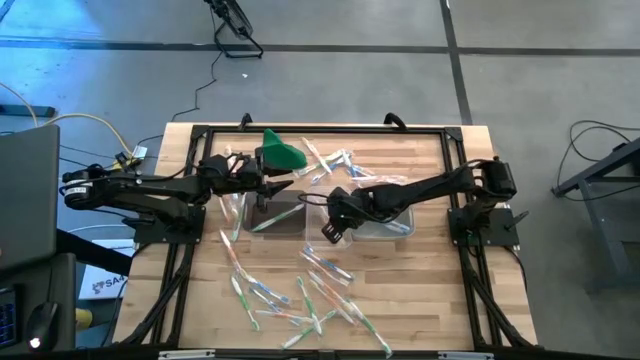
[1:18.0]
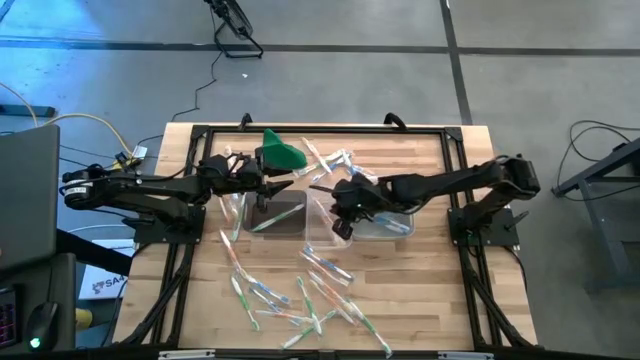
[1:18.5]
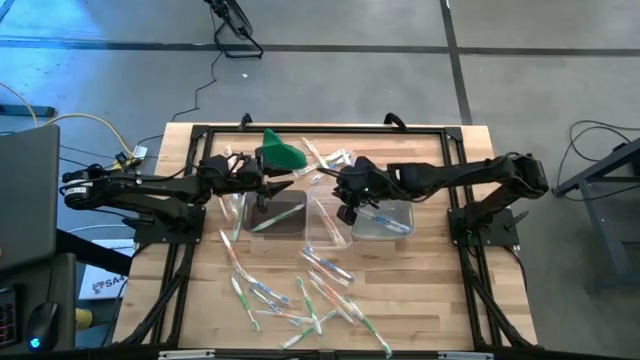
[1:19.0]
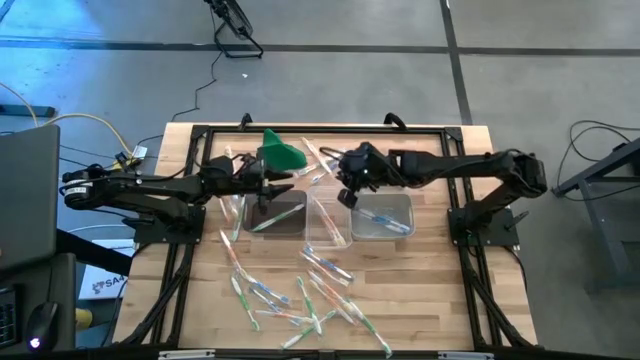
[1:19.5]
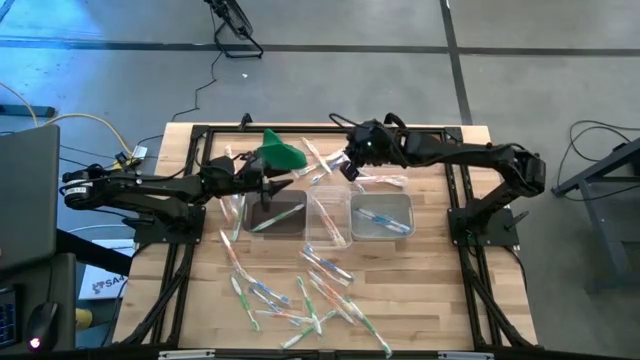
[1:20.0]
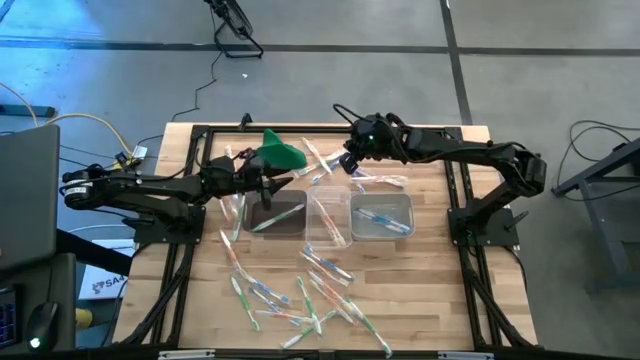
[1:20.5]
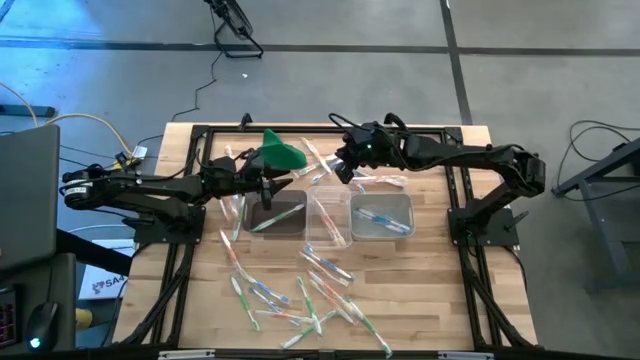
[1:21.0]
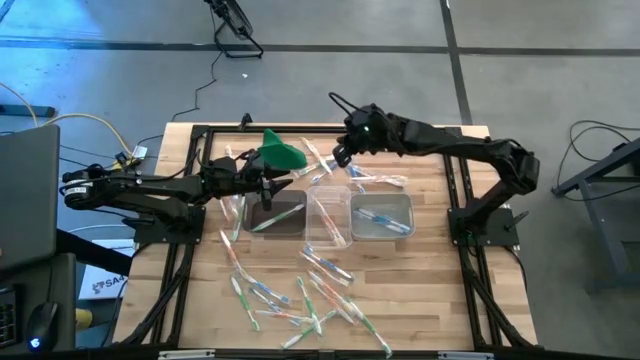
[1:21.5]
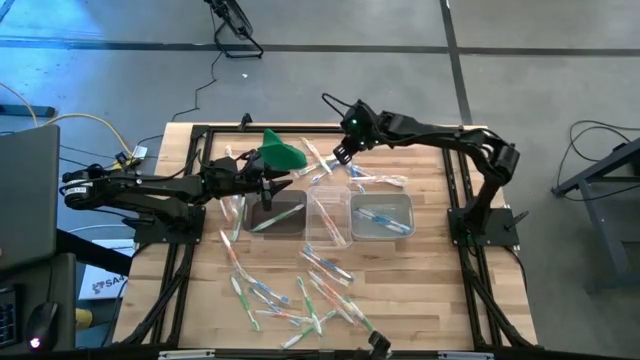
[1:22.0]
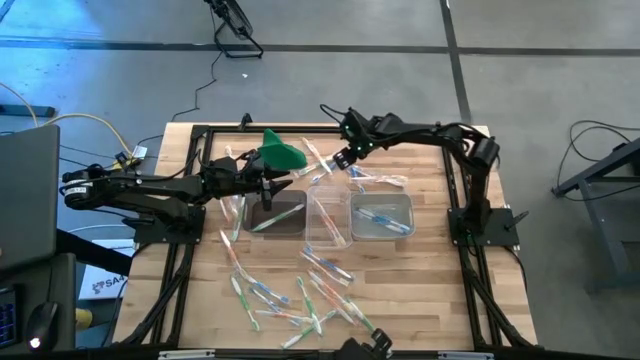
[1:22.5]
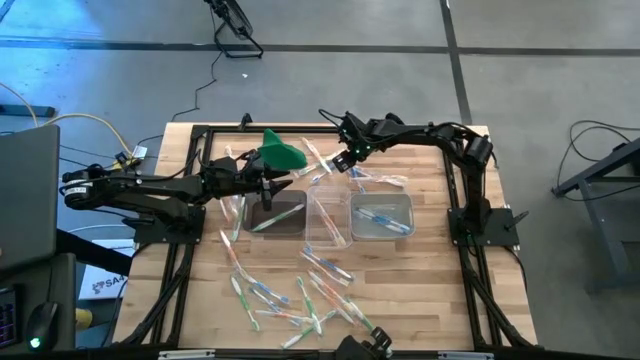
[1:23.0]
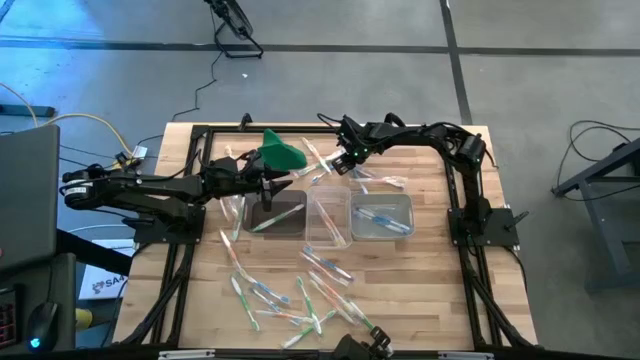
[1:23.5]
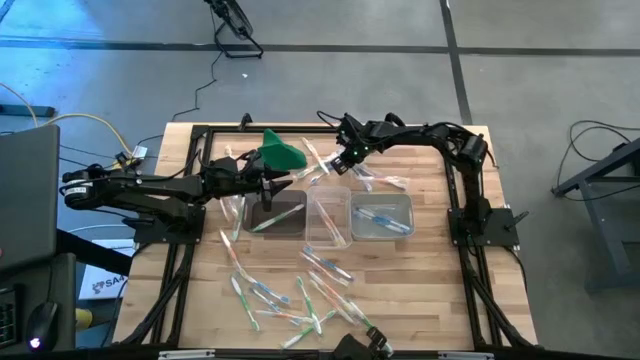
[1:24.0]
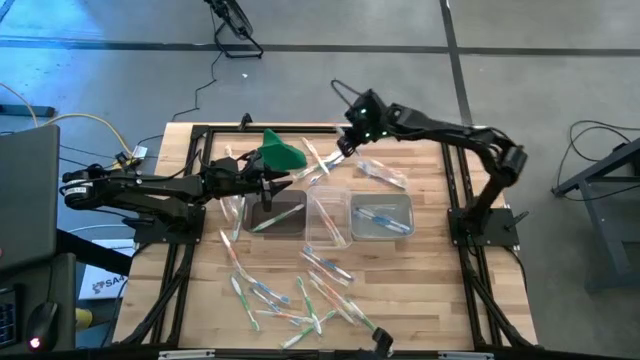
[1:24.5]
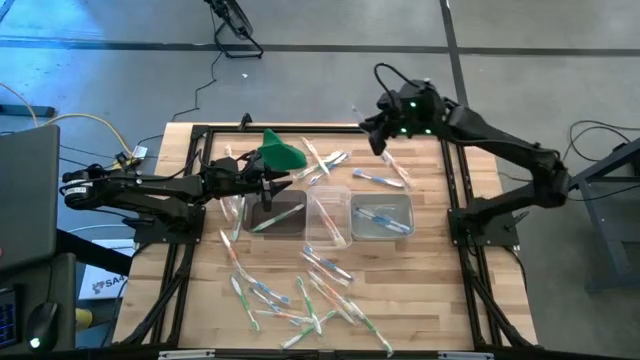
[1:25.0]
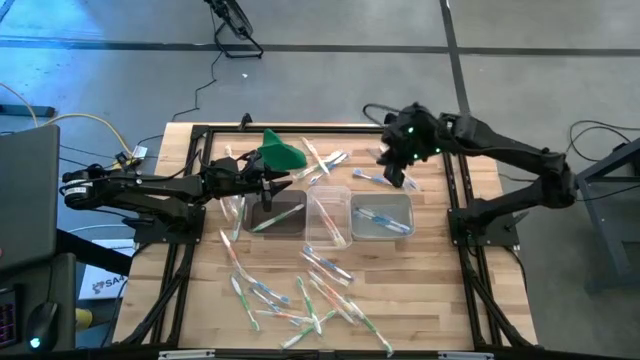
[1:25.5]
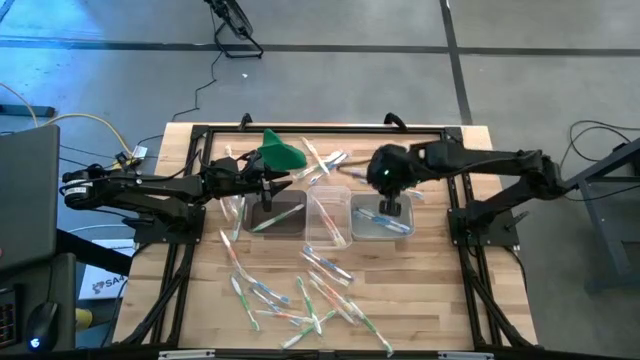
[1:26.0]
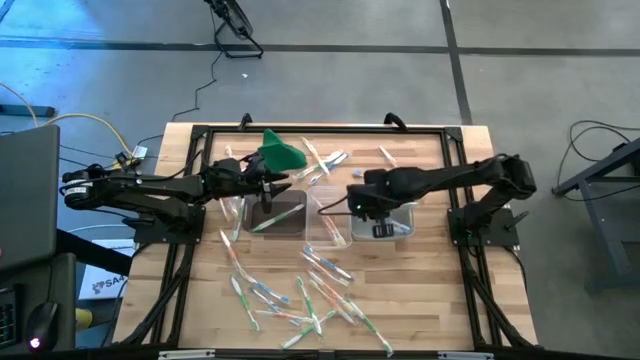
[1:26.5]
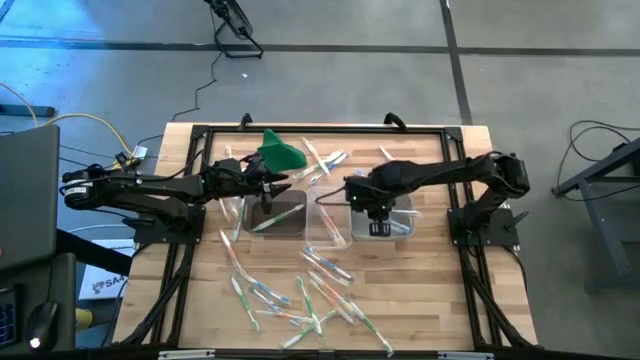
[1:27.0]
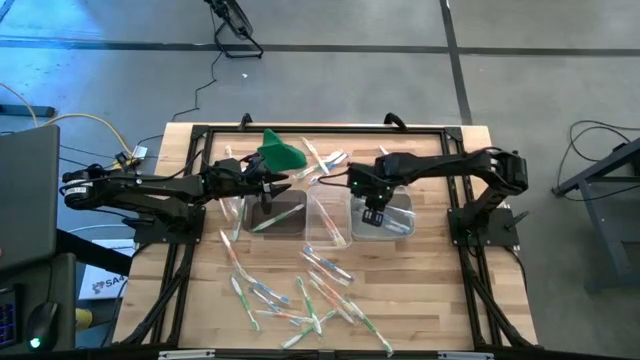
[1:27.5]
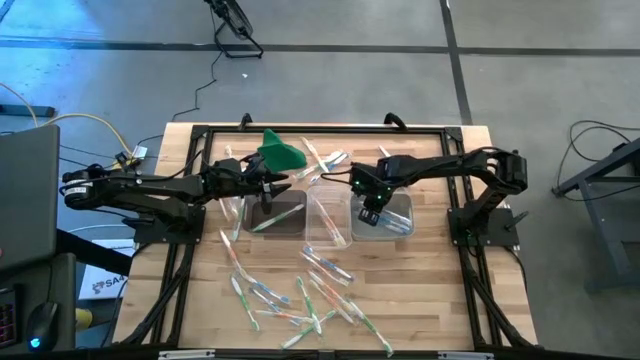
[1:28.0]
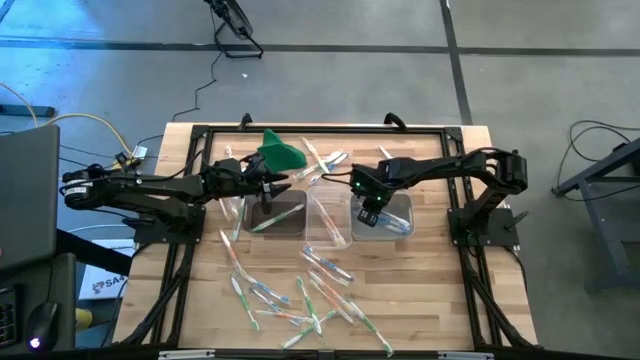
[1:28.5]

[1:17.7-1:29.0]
Task: Pick & Place Toothbrushes
Put the blue toothbrush into the gray bin

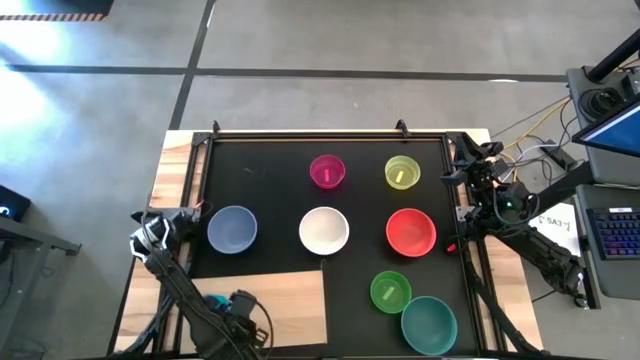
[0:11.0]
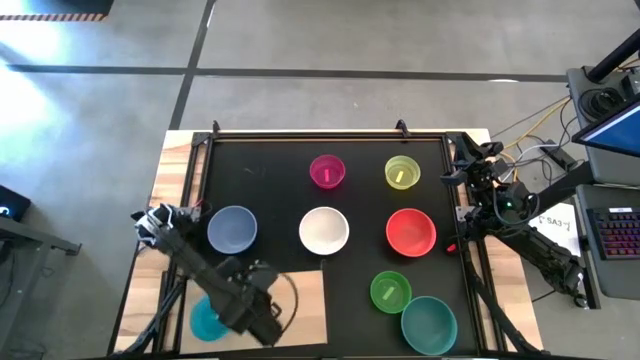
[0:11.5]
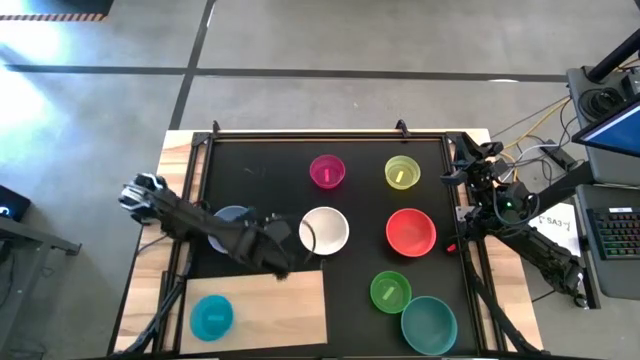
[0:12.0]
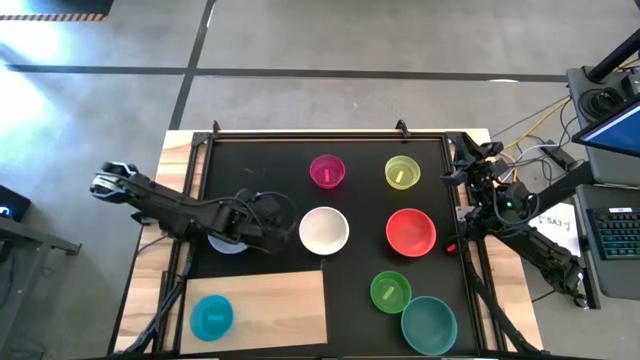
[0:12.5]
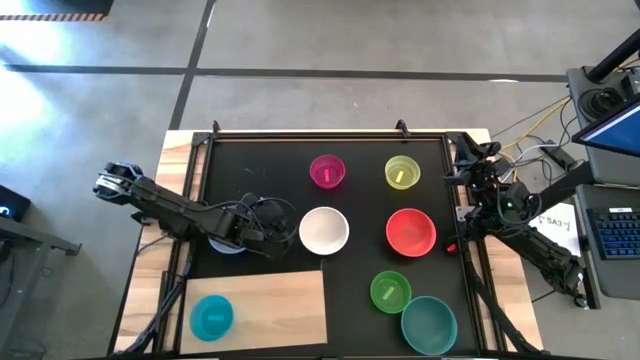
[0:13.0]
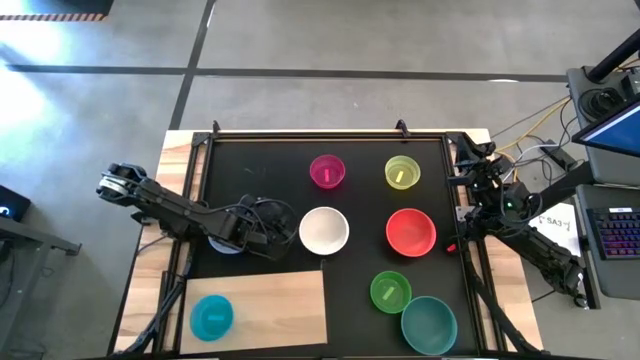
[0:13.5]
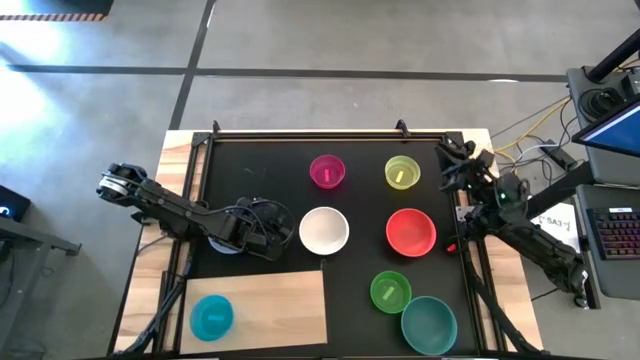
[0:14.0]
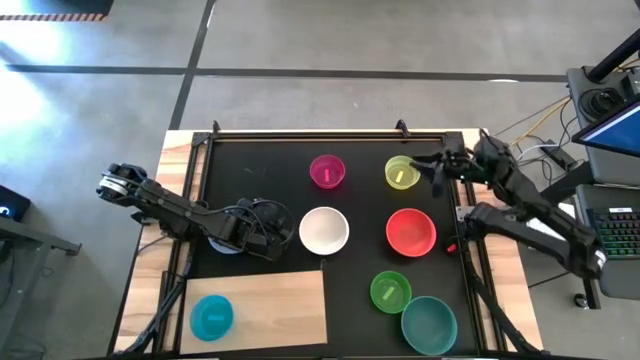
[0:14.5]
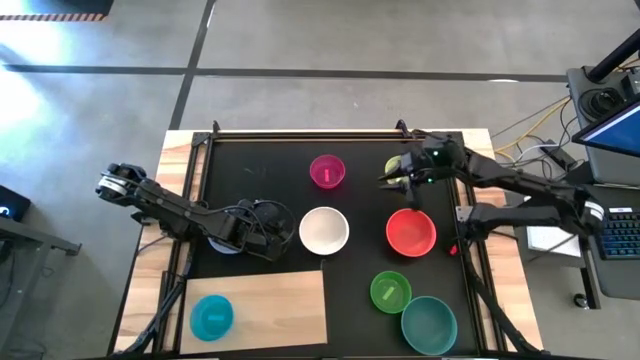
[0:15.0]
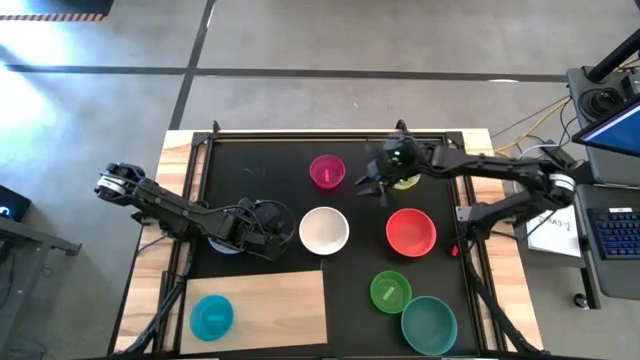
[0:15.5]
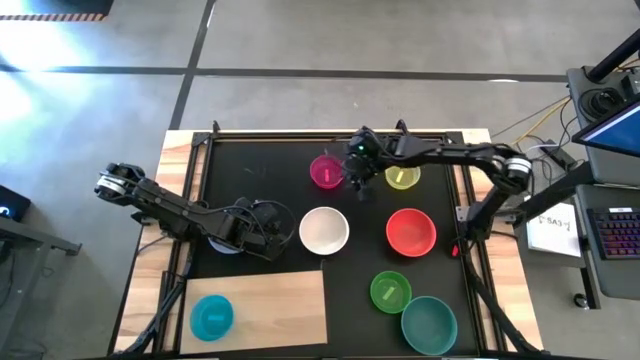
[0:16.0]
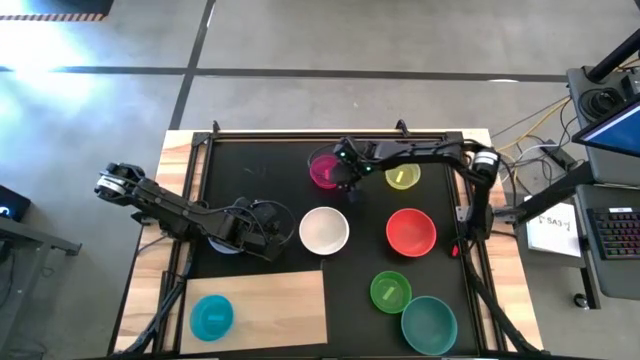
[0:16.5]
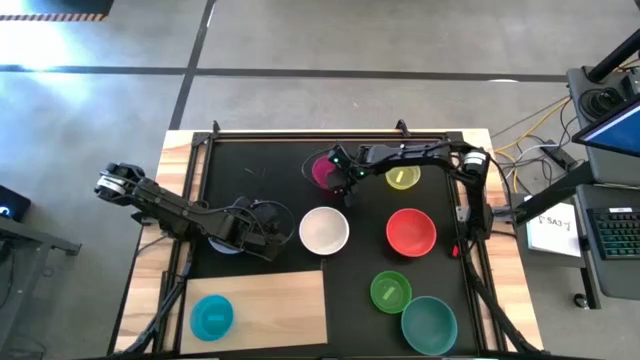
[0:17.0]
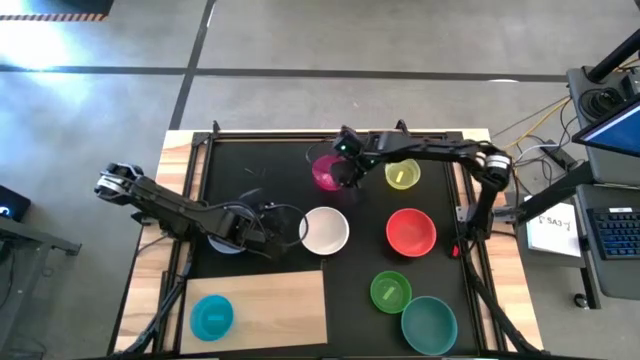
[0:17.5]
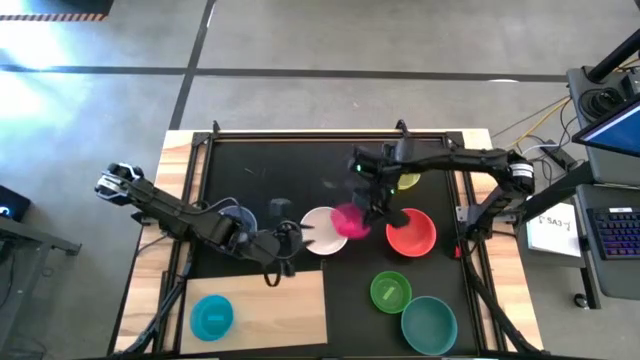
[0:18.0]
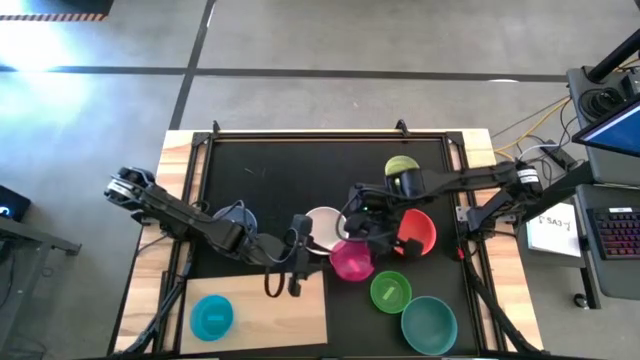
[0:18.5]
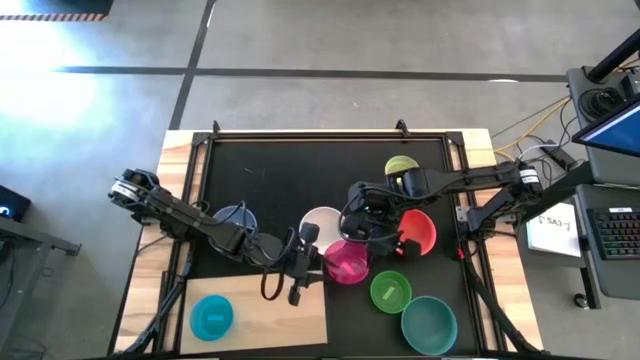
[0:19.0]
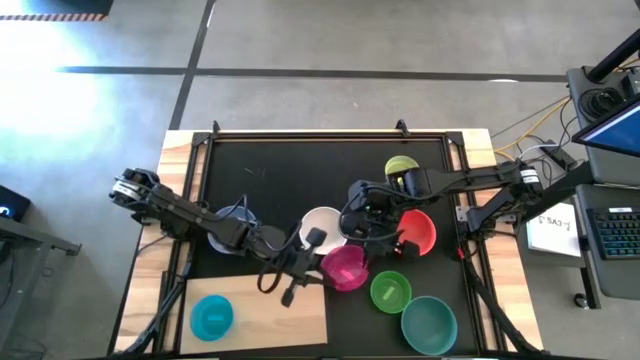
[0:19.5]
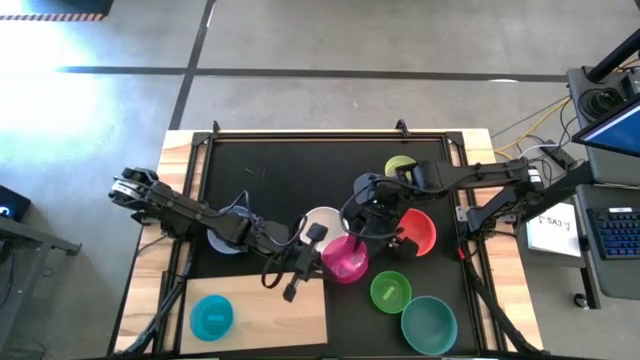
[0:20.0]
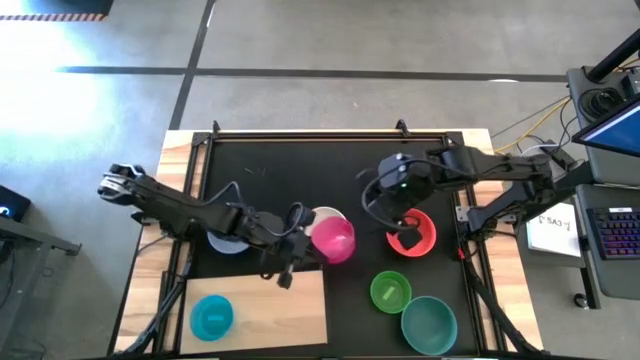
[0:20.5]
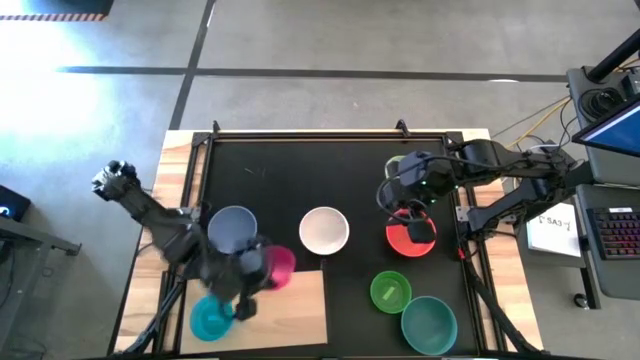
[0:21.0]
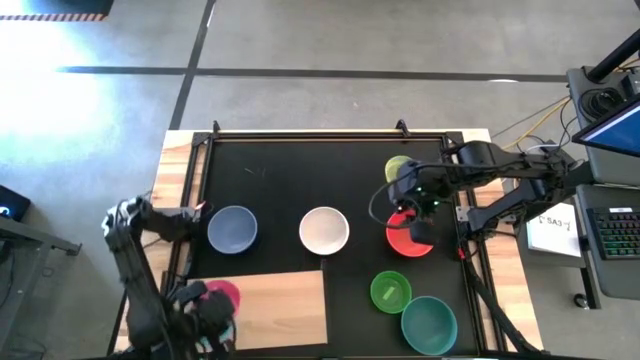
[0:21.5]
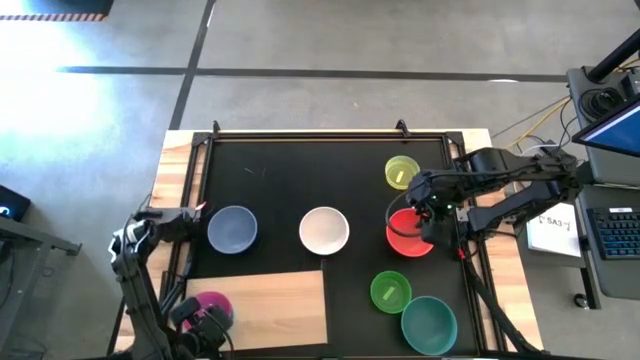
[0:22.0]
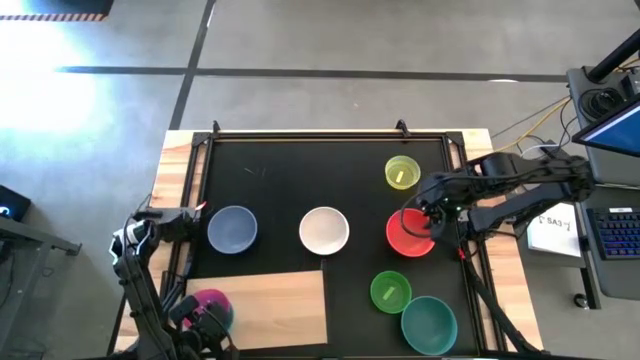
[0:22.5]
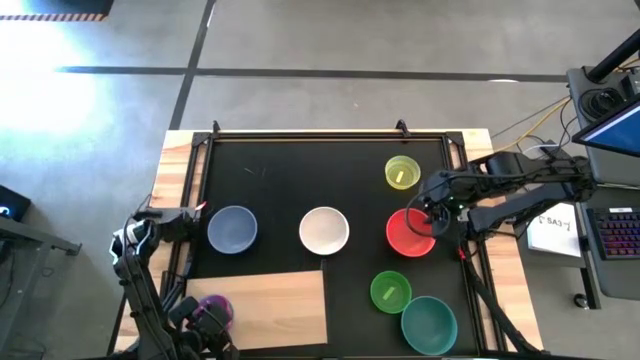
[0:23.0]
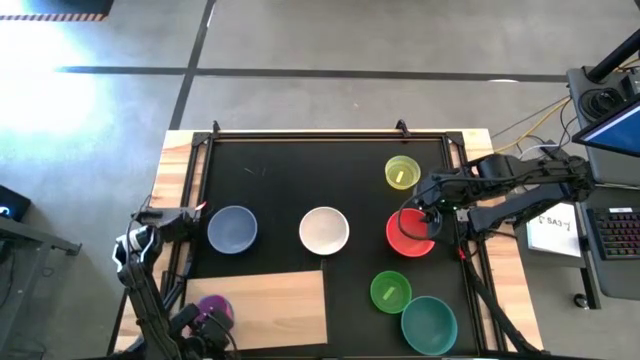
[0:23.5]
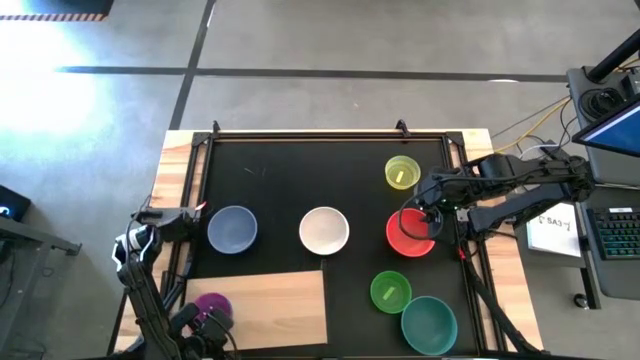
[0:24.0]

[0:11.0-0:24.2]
Task: Place and stack bowls onto a shelf
Stack the pink bowl on top of the blue bowl on the shelf
